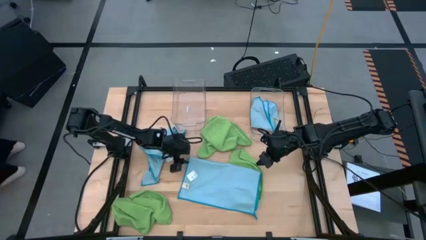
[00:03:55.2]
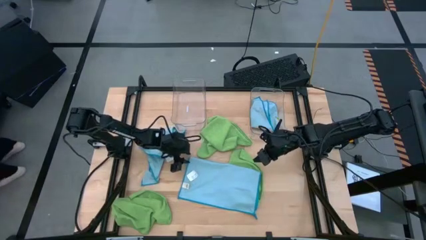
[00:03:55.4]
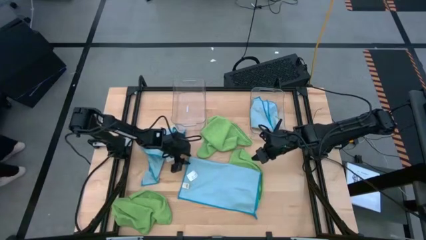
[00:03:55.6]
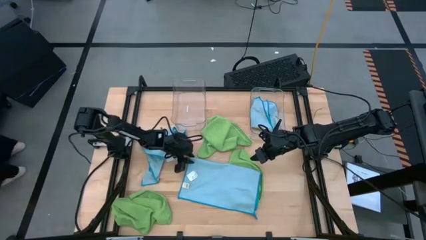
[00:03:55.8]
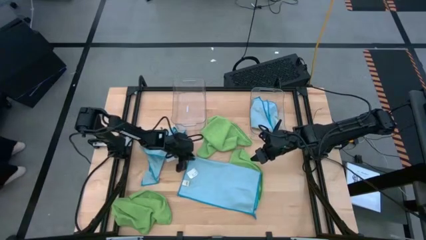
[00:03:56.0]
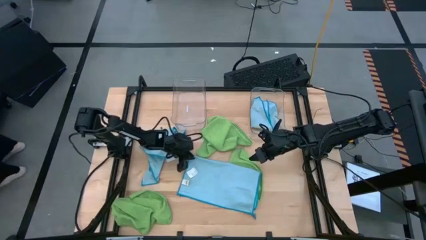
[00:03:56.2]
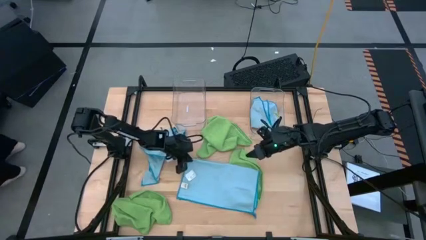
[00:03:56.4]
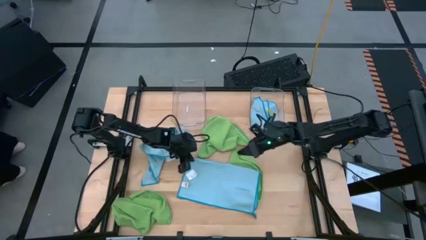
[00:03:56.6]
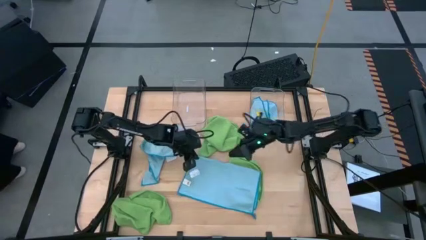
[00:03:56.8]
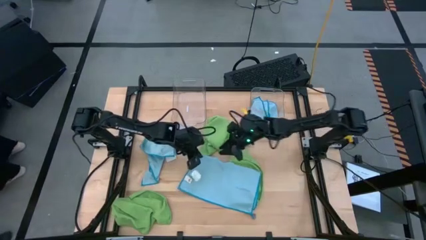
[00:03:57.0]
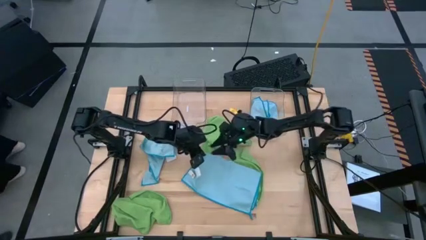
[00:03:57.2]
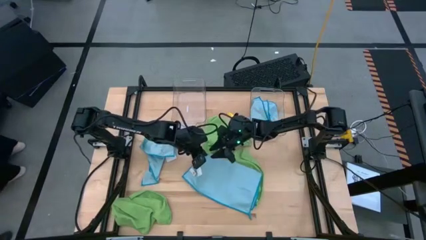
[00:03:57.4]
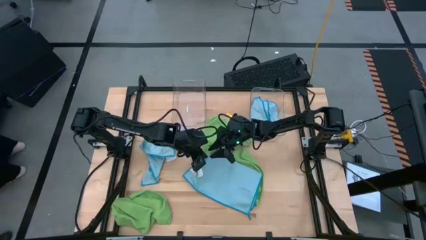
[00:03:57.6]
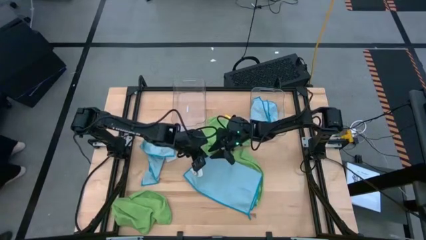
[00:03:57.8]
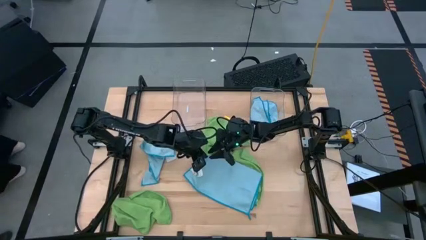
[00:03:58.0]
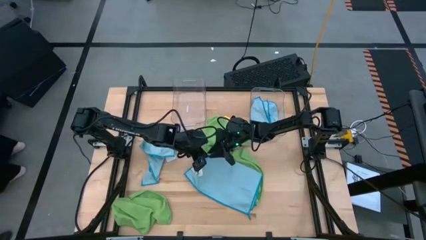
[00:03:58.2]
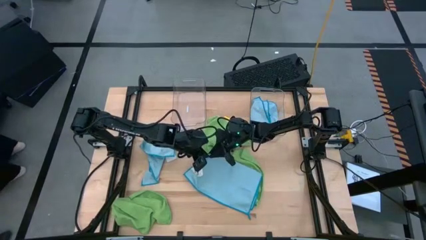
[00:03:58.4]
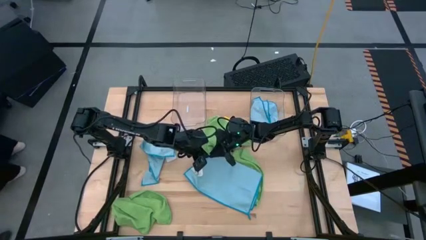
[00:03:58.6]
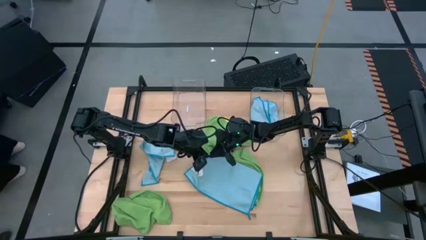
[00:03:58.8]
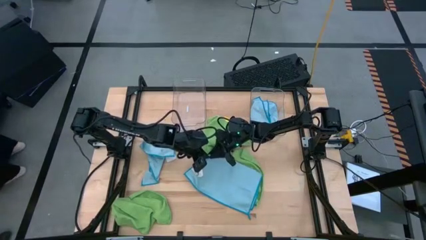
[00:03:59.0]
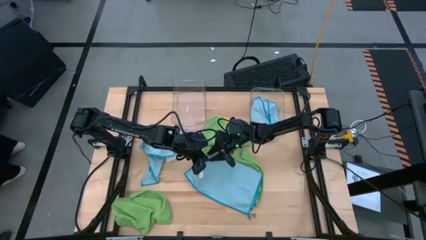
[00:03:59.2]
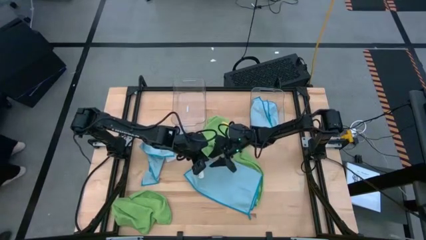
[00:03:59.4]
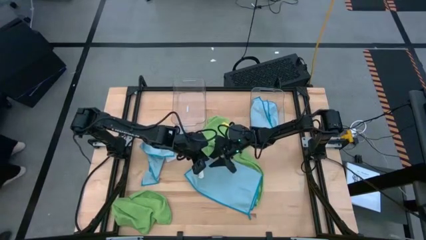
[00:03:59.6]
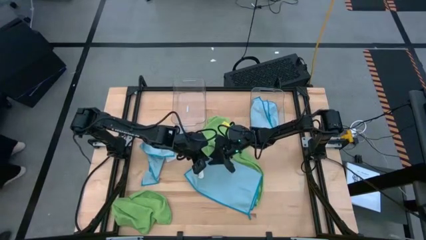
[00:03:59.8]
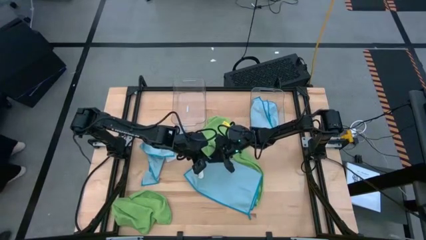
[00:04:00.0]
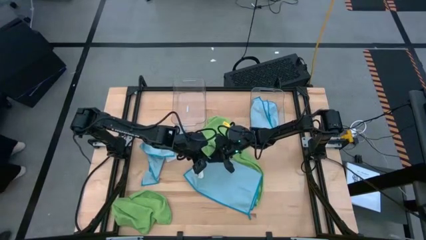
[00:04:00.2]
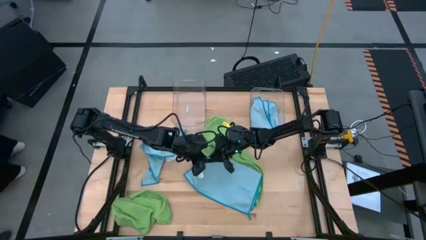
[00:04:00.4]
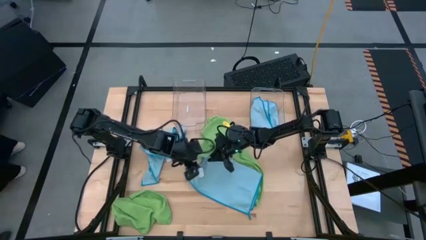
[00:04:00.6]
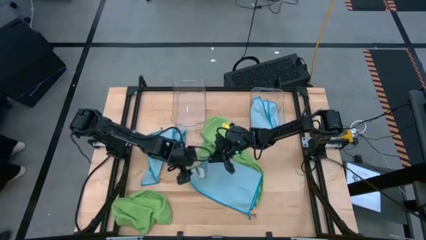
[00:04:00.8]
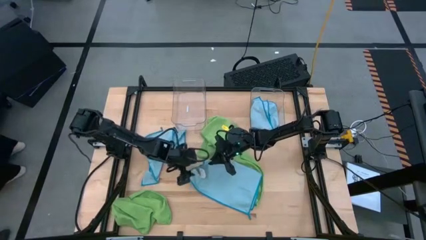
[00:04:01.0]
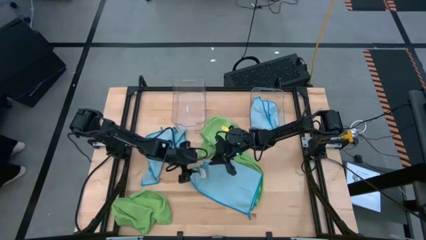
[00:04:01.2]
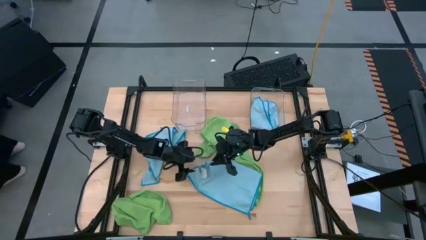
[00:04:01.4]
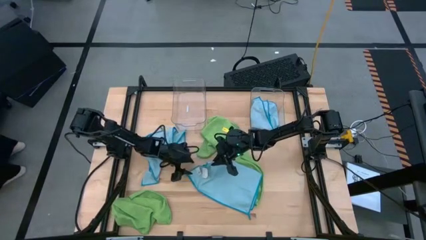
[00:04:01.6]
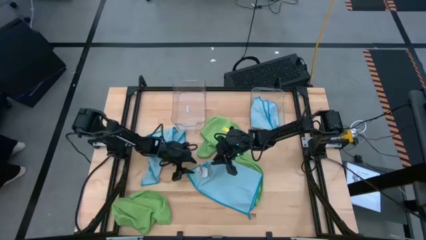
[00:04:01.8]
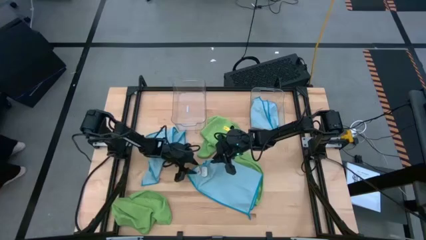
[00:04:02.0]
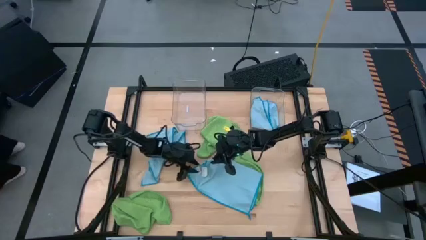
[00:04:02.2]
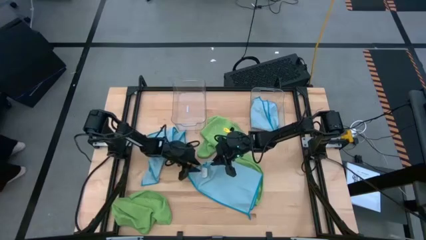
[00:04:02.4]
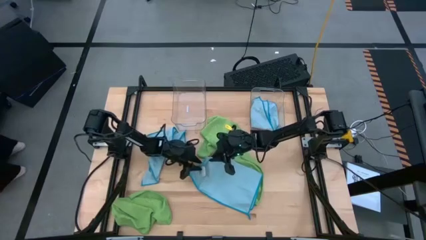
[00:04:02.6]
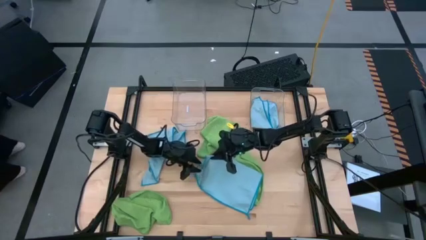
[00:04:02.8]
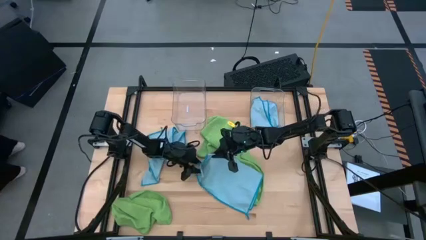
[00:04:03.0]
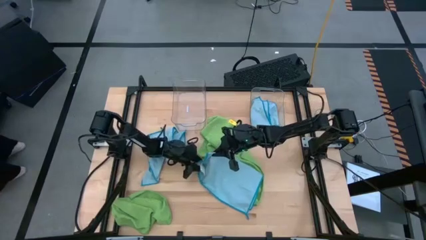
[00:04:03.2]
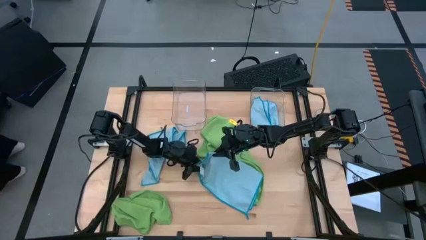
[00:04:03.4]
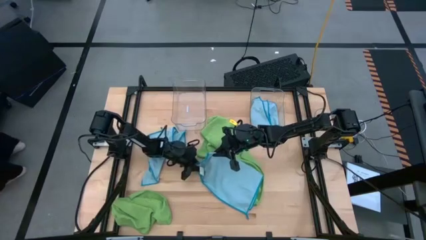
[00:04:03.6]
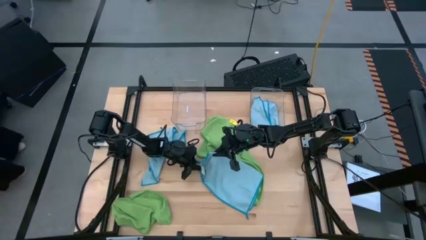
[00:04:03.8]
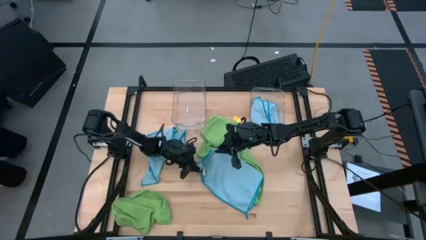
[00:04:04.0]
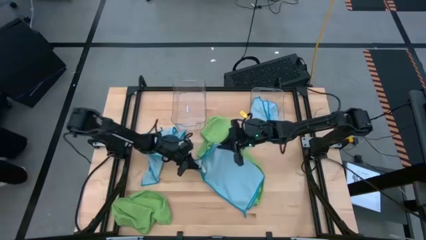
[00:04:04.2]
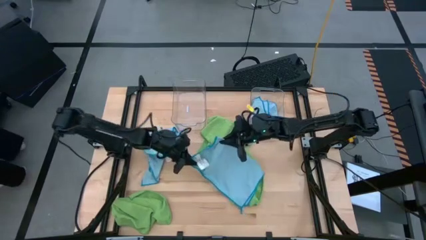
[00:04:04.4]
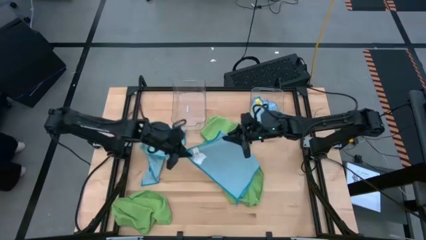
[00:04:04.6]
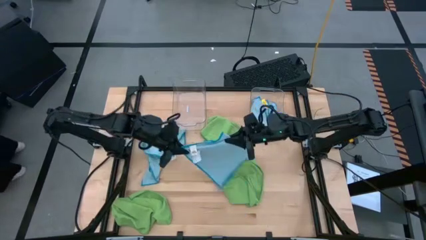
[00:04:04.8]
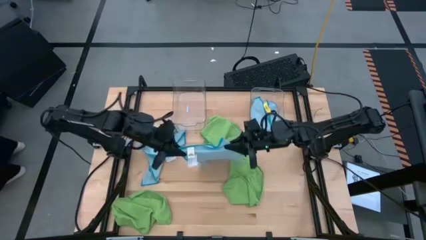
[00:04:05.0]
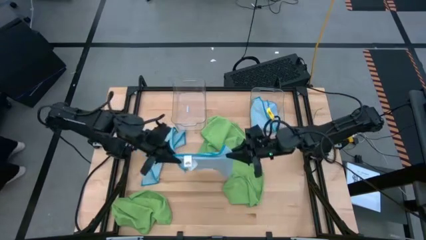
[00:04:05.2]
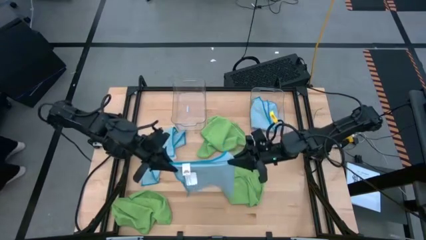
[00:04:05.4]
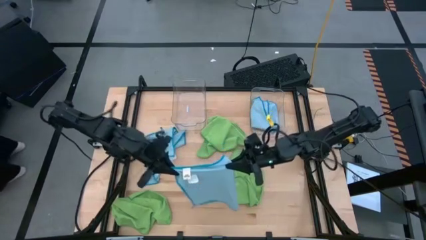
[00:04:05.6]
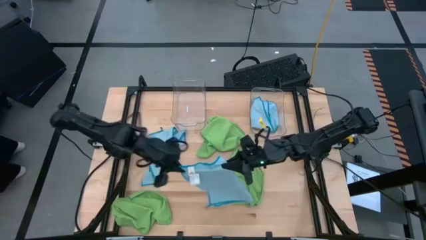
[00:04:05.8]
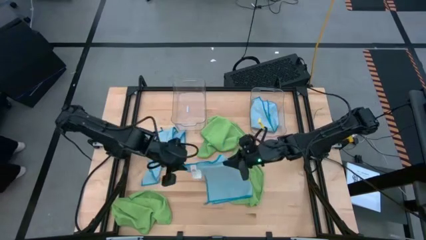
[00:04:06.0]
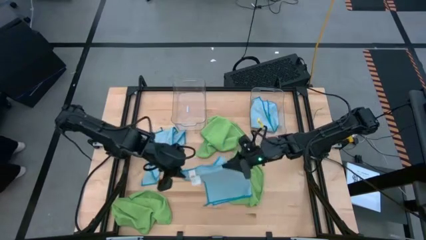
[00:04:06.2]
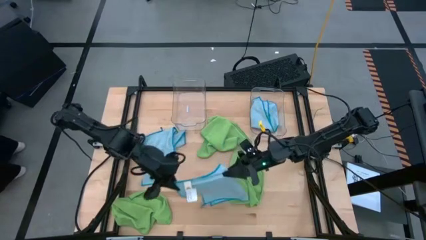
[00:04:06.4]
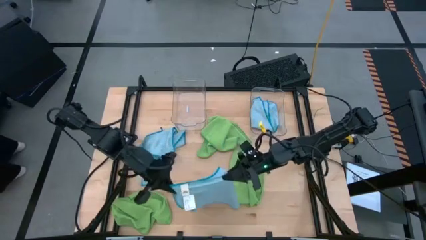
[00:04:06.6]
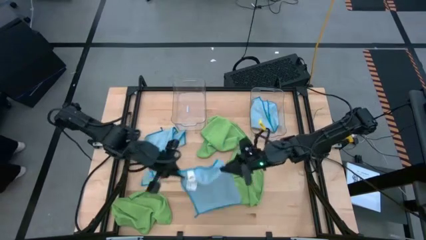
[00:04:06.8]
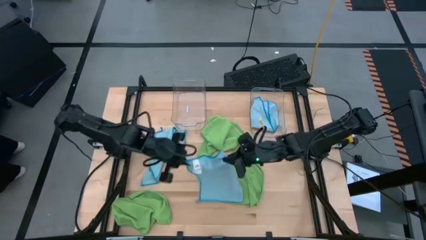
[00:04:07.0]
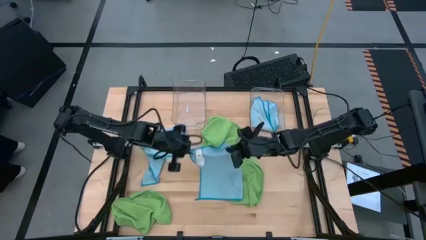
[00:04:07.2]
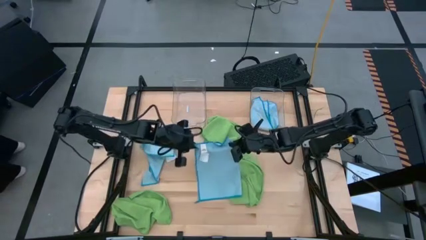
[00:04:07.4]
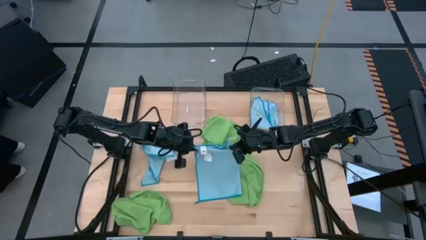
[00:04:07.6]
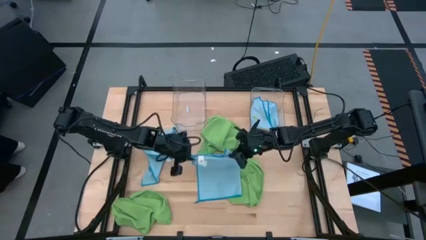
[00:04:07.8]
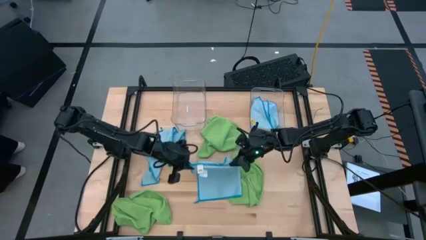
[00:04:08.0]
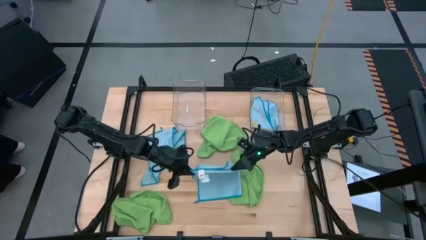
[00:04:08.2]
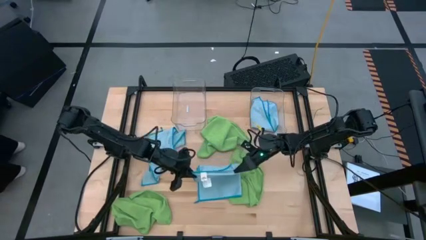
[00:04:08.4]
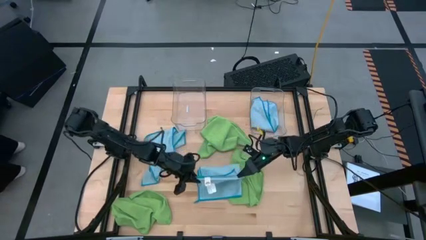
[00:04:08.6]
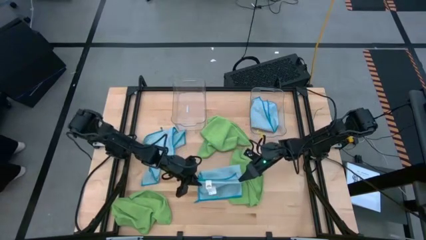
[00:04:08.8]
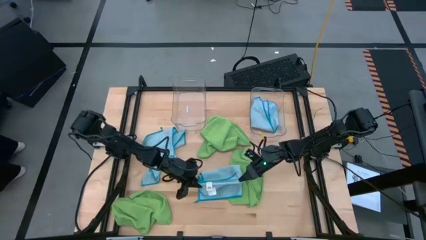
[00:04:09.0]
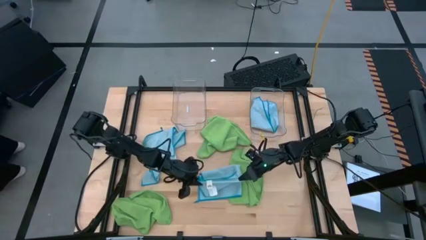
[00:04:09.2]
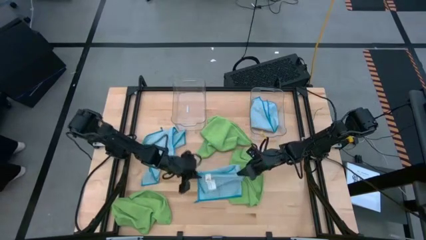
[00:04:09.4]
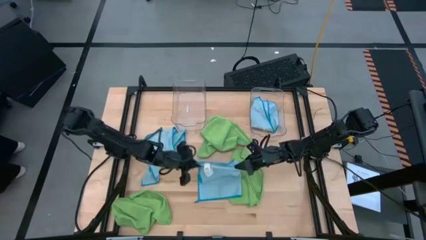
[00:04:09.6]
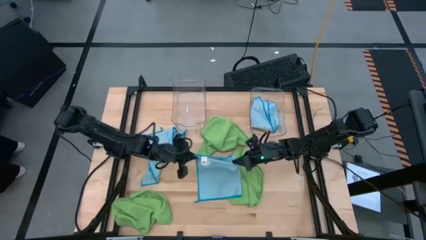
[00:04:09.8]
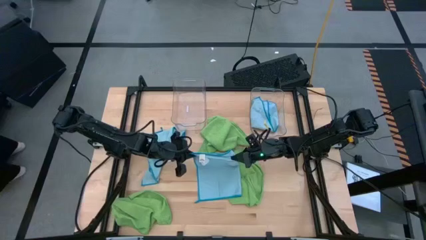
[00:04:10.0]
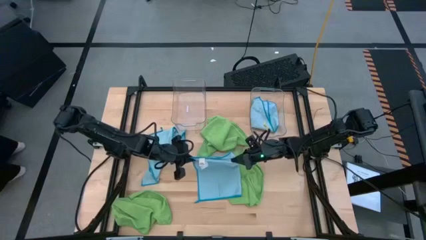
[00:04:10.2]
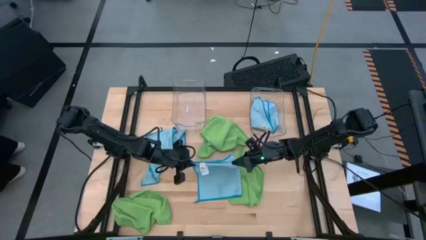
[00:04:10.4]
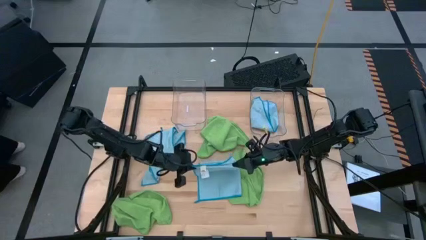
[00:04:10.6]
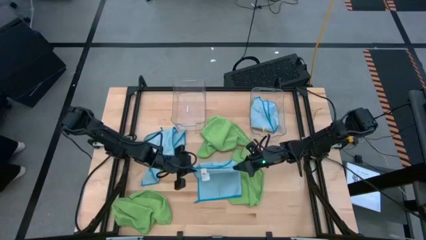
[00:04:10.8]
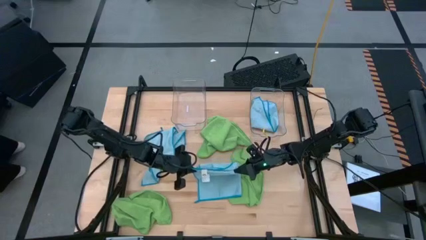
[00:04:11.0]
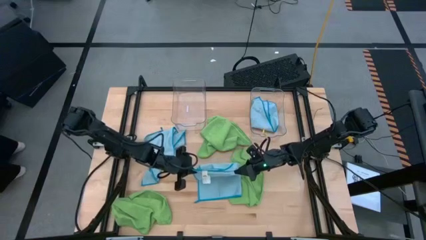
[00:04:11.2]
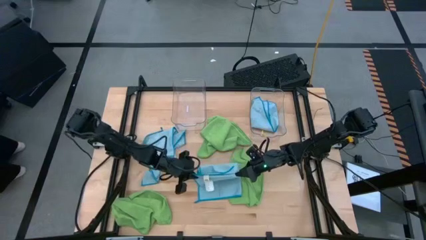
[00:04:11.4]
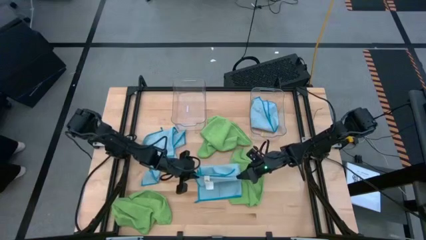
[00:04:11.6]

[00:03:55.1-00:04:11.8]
Task: Fold microfiber towels
Fold the right blue microfiber towel
